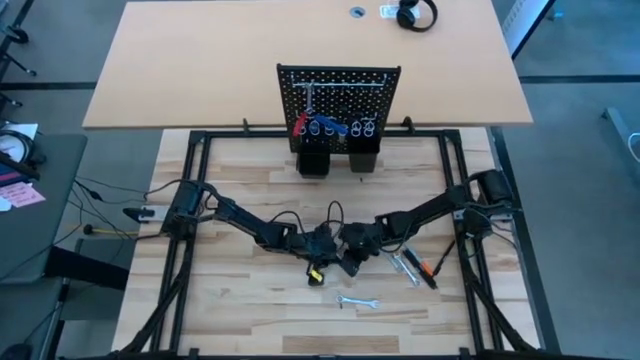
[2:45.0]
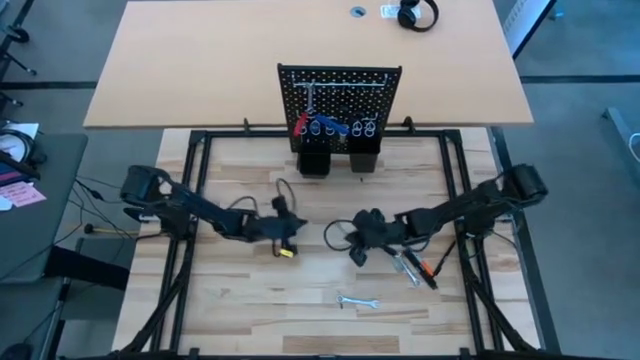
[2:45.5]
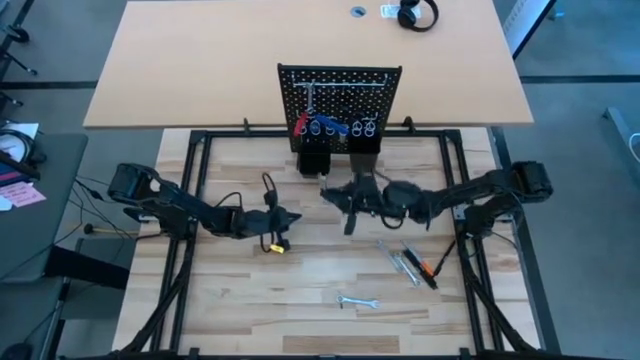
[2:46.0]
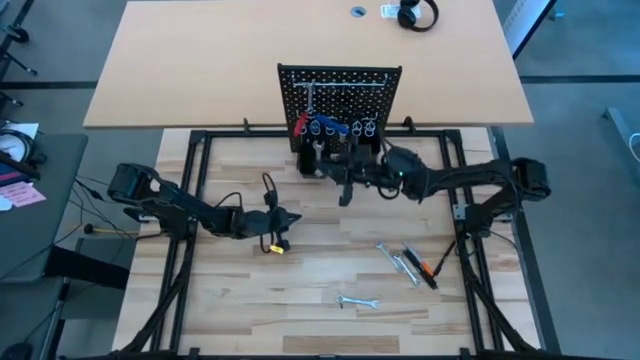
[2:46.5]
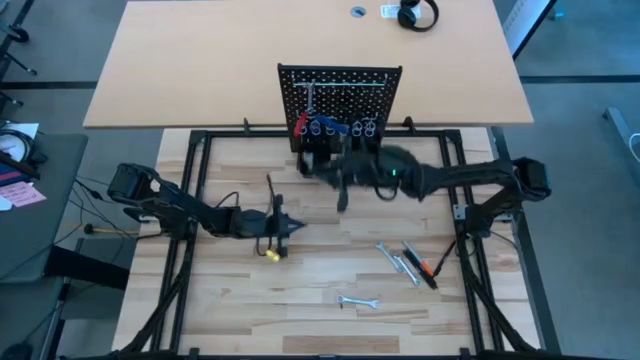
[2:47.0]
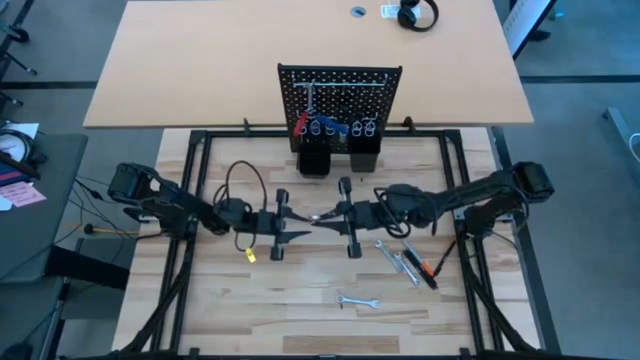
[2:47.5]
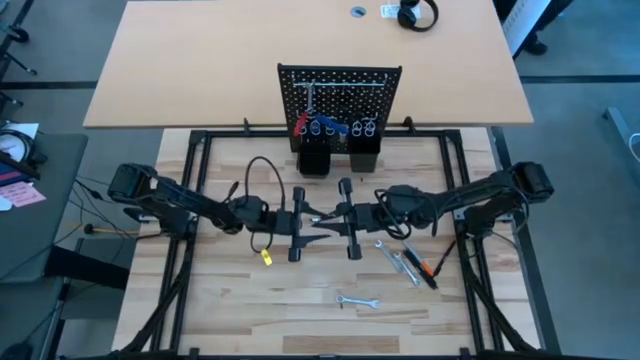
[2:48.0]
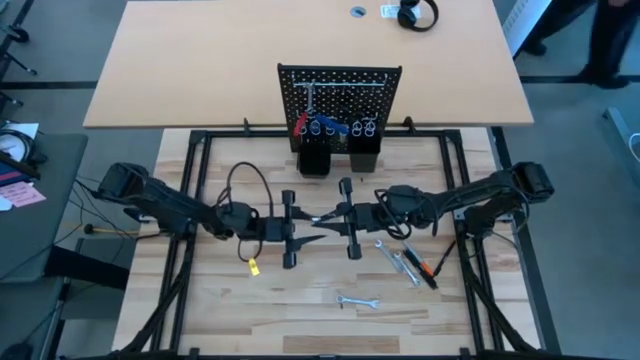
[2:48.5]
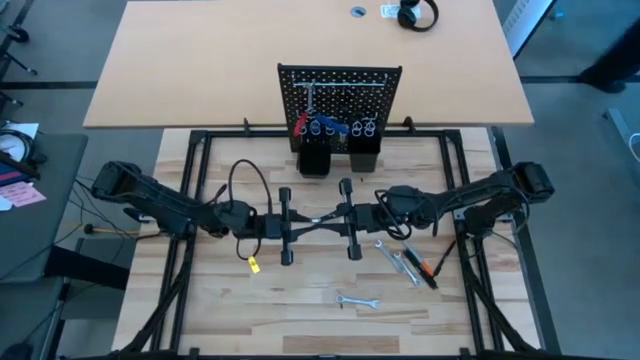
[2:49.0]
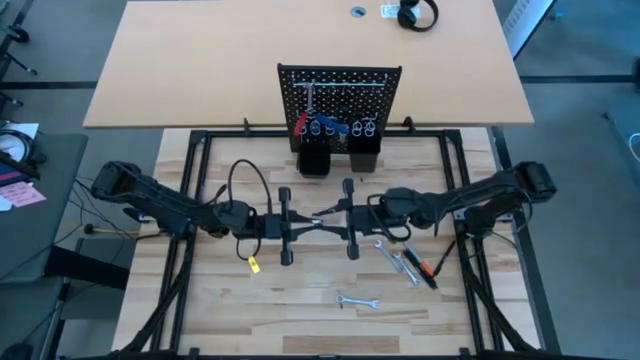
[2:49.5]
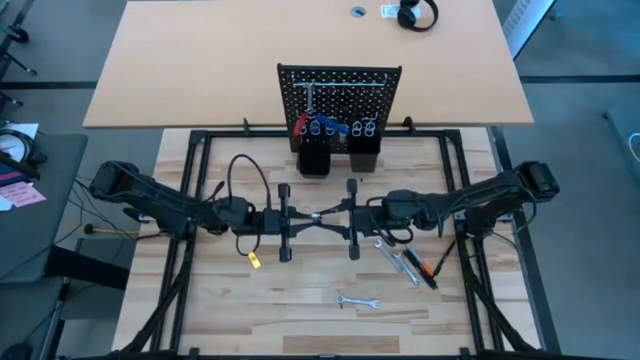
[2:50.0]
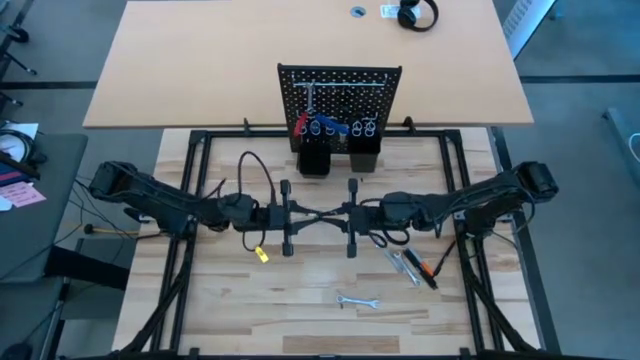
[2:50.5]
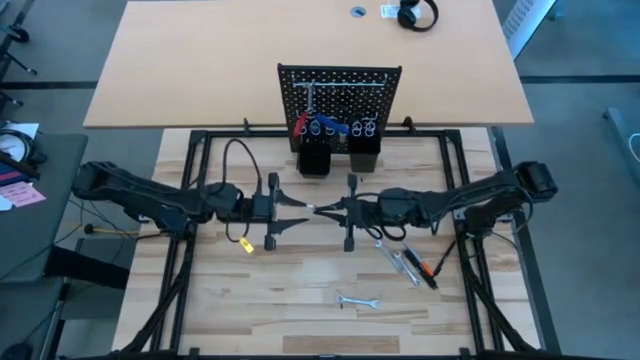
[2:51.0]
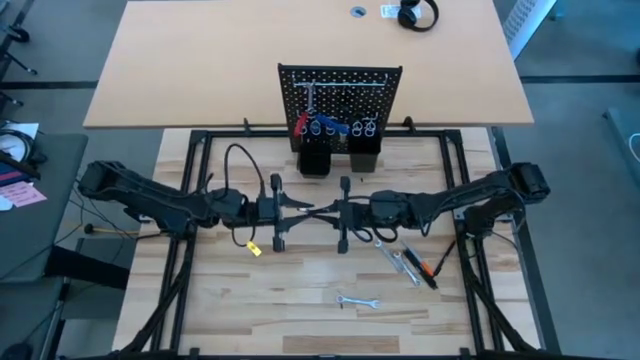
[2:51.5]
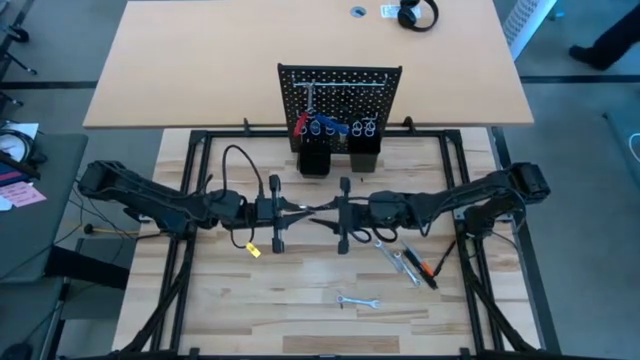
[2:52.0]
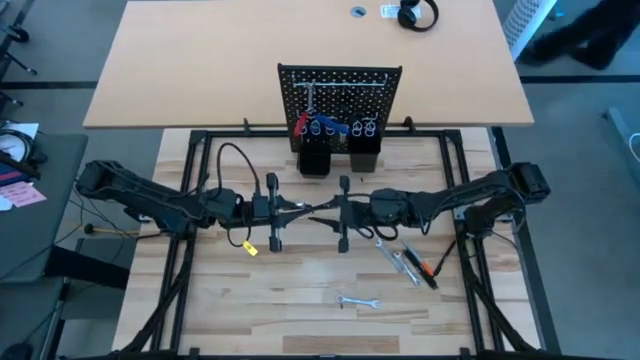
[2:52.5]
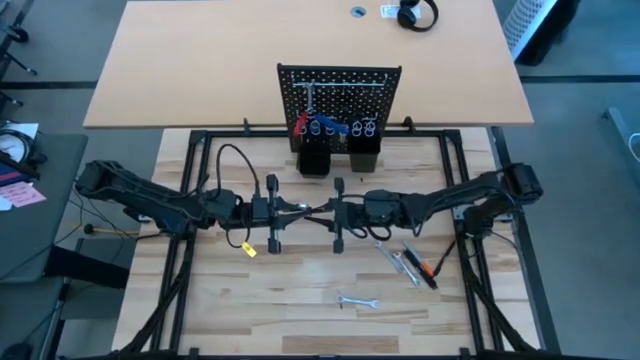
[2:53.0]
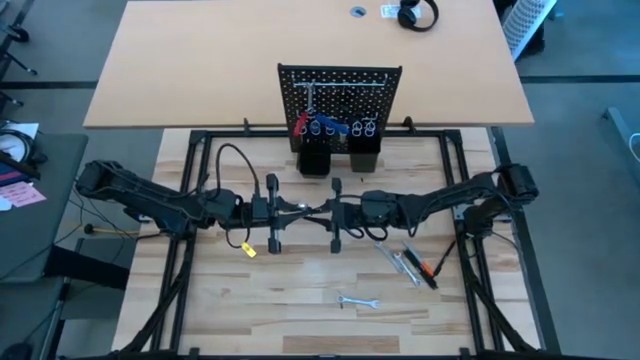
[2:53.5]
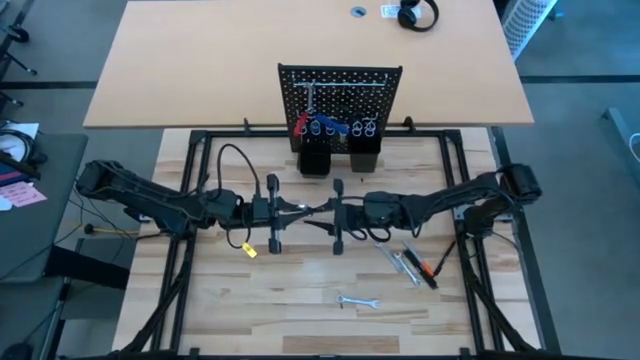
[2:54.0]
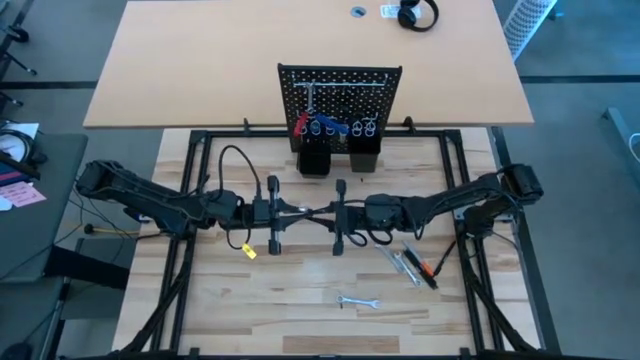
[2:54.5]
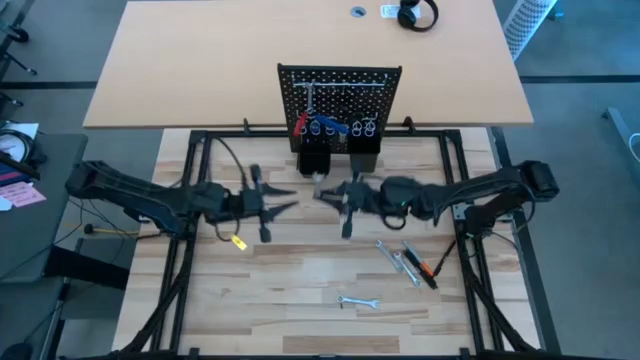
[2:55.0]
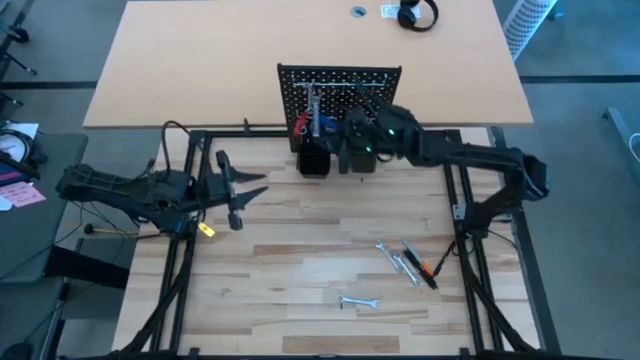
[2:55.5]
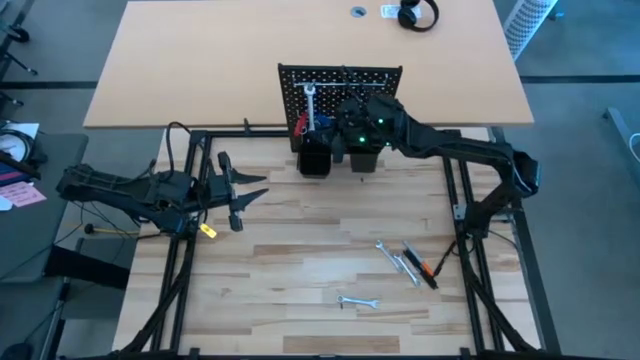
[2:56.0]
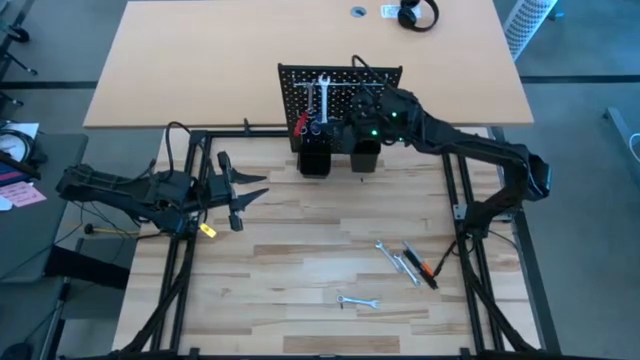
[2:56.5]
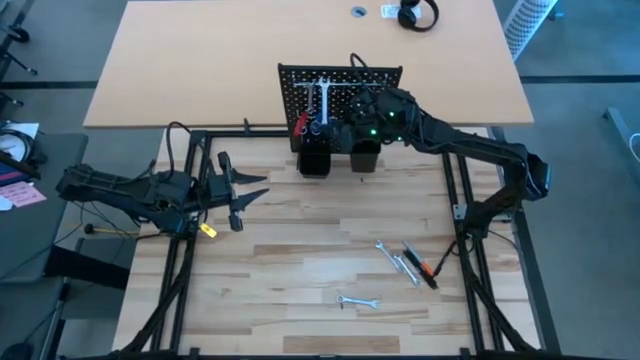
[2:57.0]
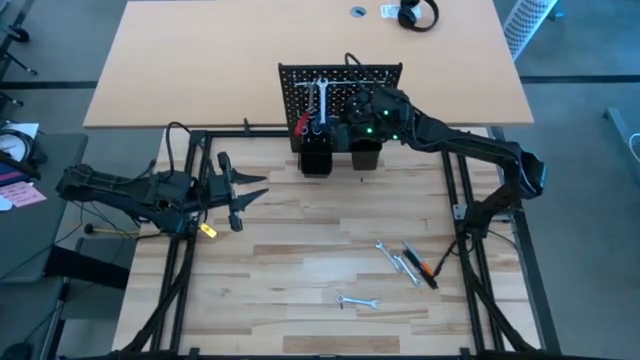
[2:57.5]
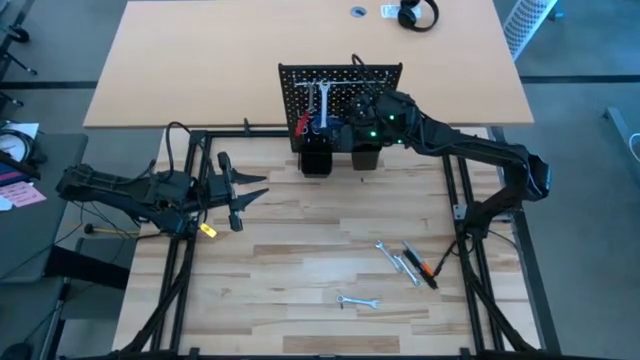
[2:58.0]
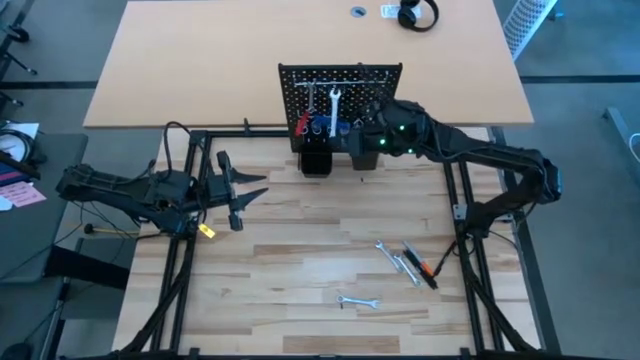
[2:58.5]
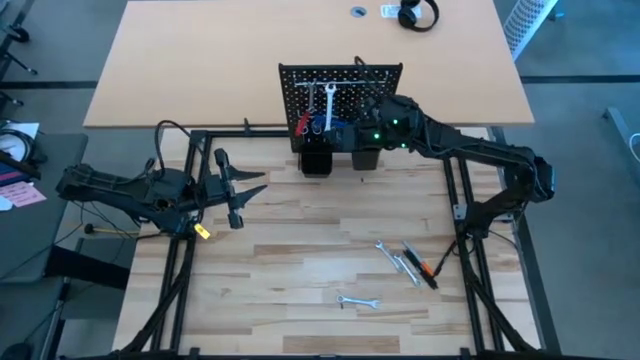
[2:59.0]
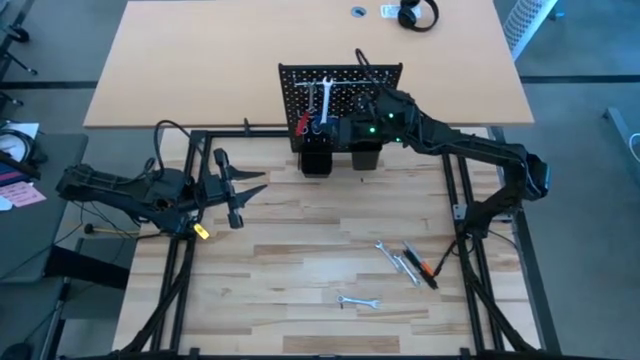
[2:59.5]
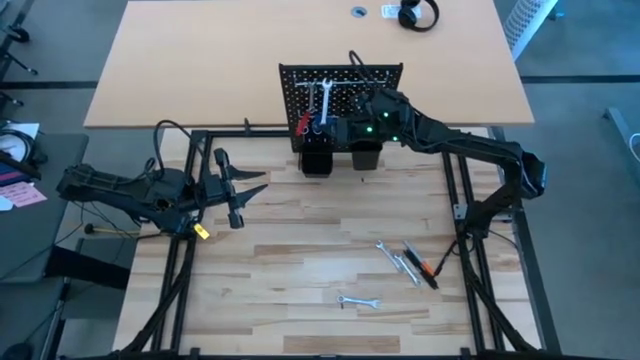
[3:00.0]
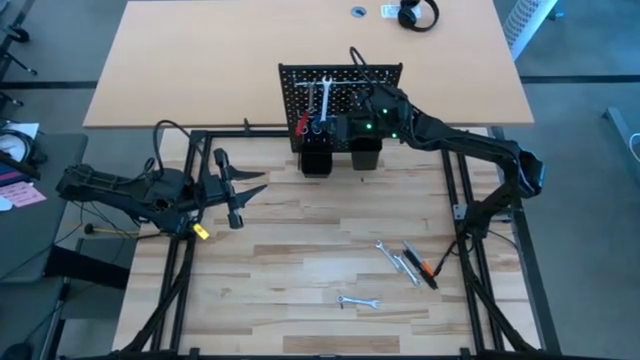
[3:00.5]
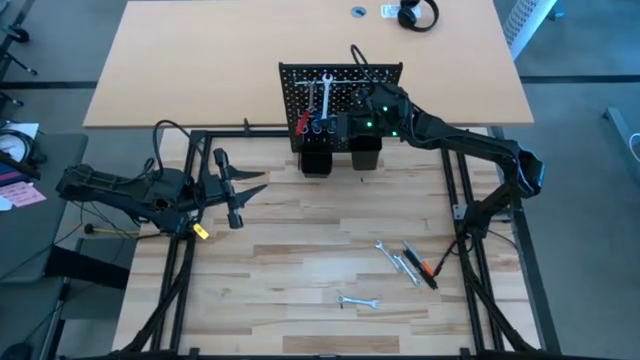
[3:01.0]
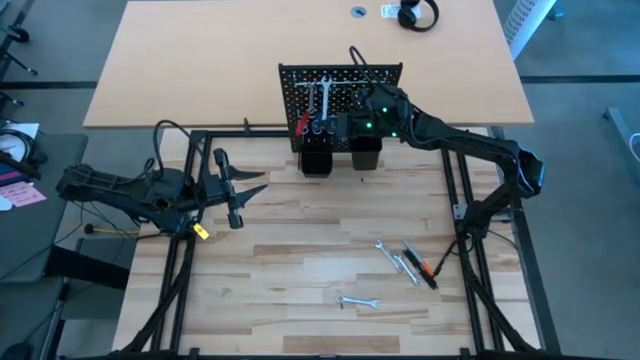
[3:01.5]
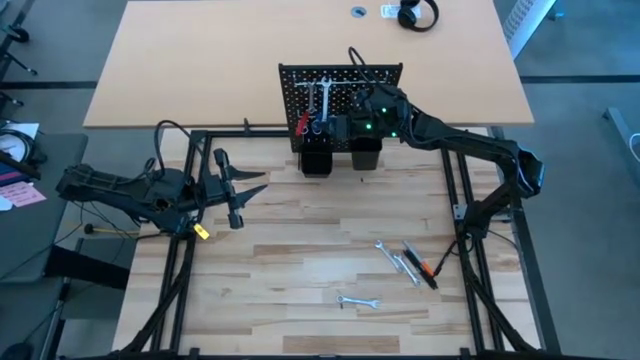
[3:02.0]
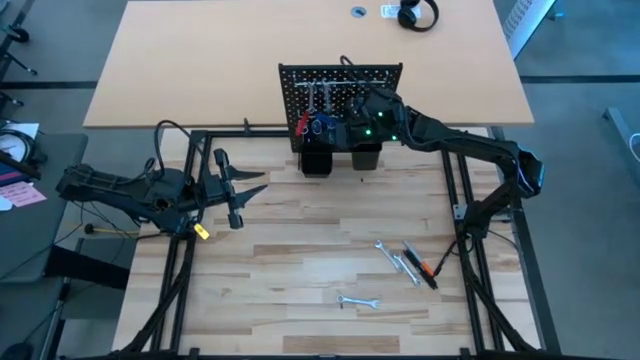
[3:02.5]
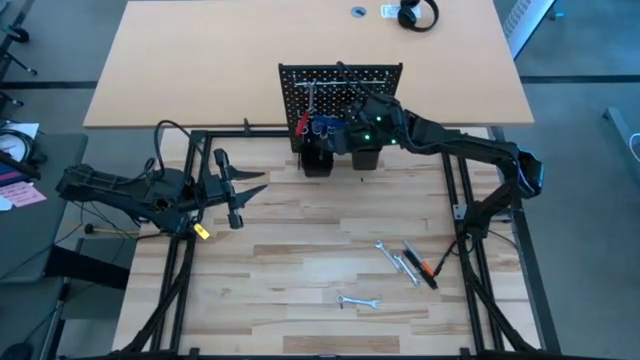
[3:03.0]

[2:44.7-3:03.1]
Task: Hang tools onto peg board
Hang the wrench on the pegboard
